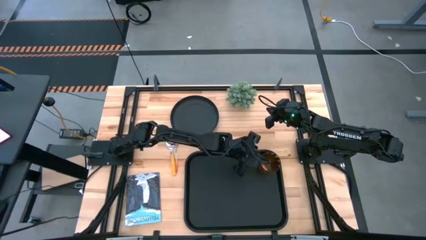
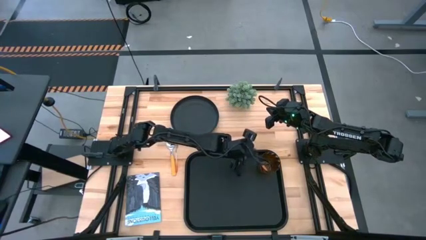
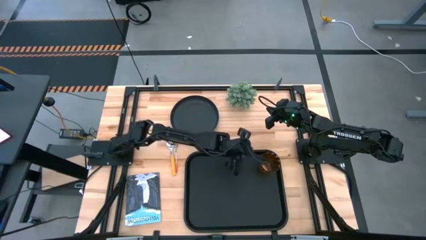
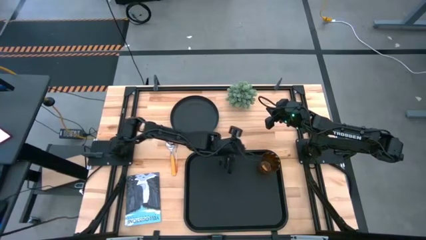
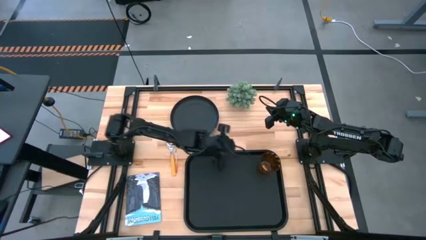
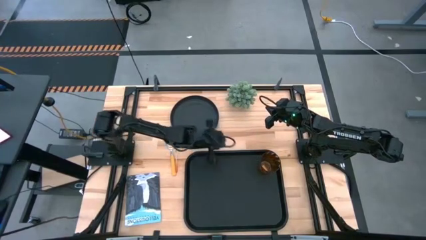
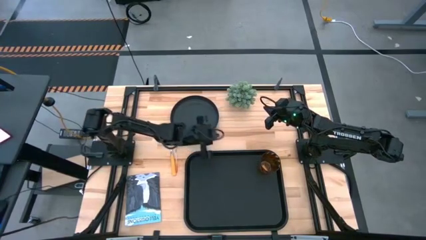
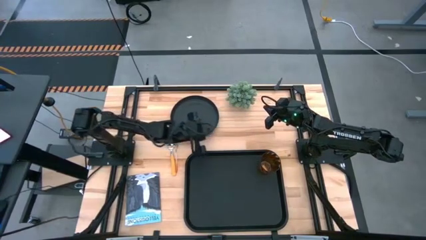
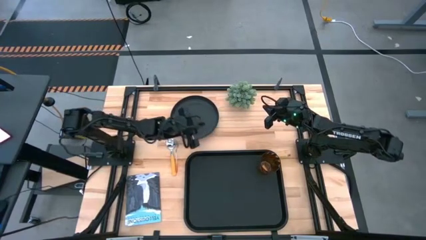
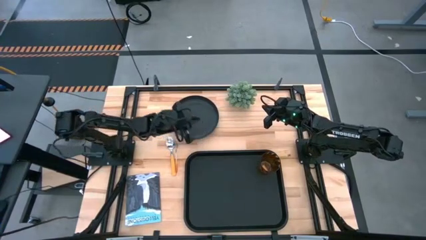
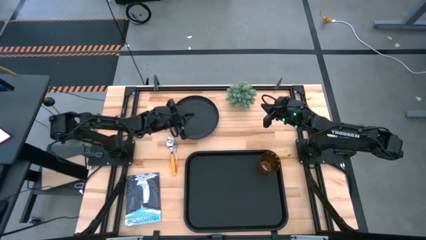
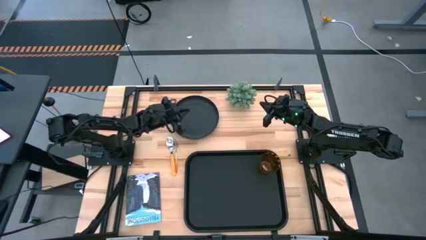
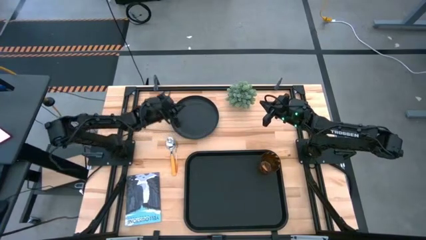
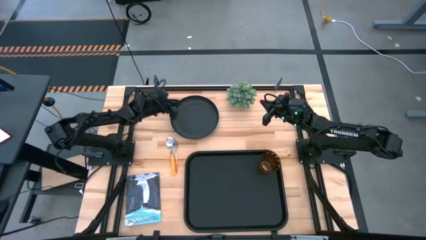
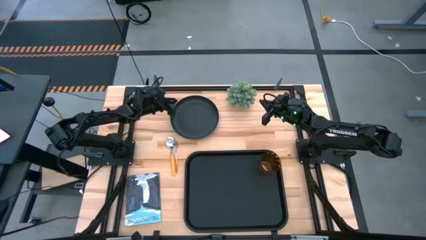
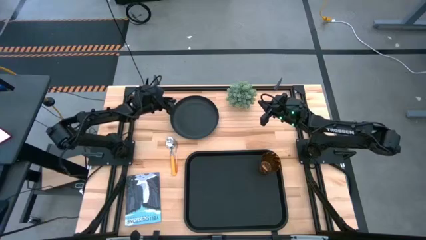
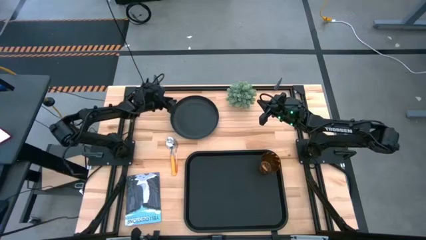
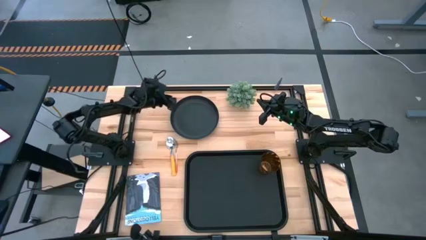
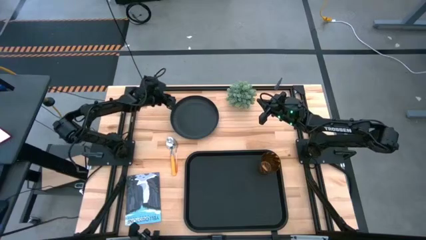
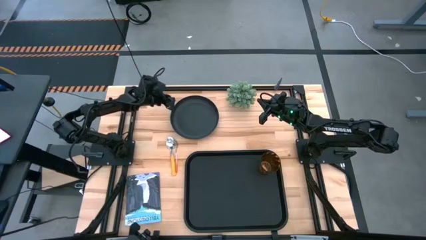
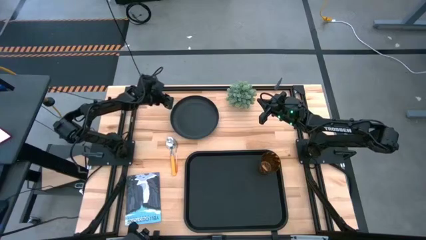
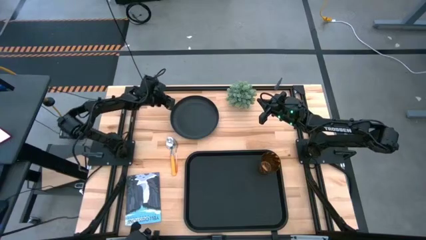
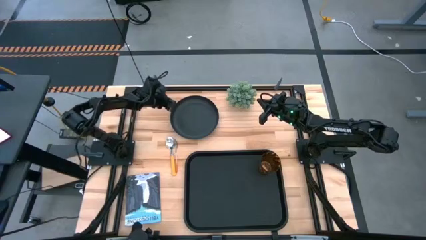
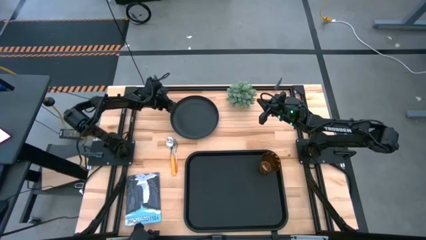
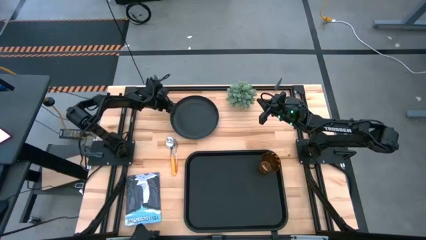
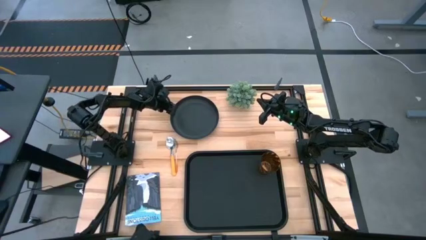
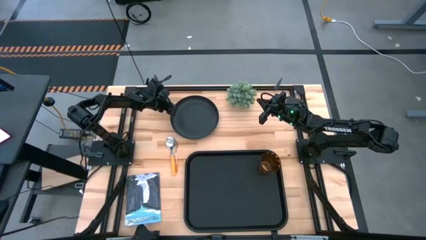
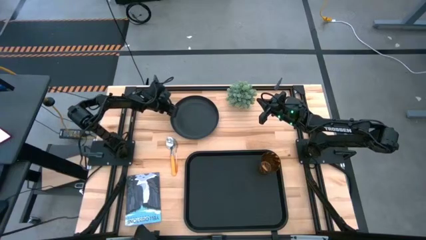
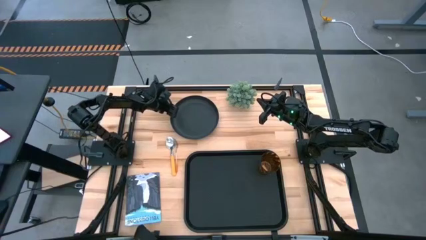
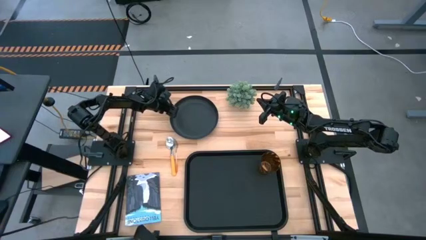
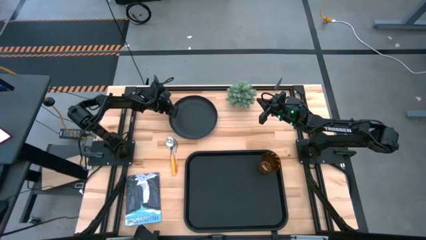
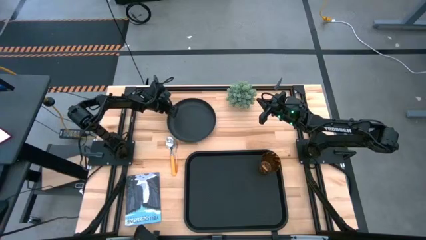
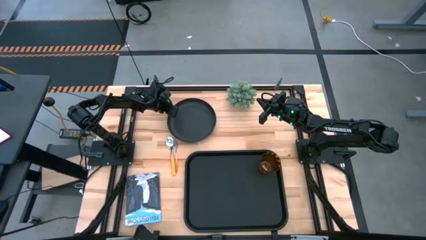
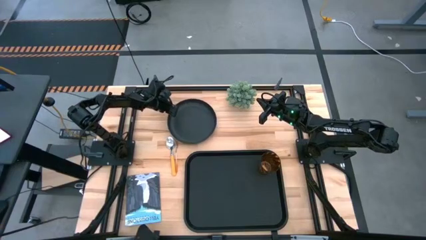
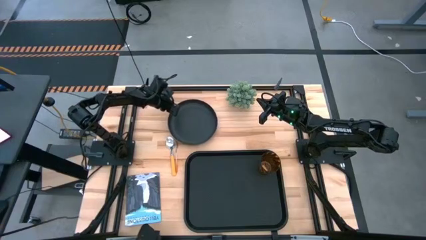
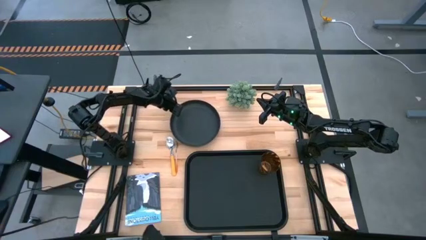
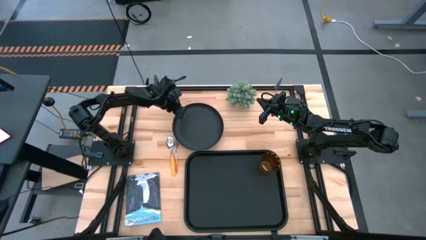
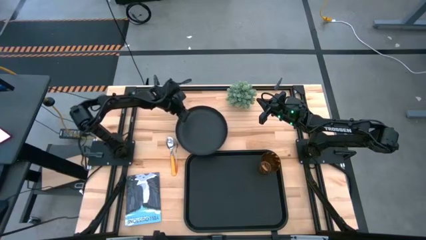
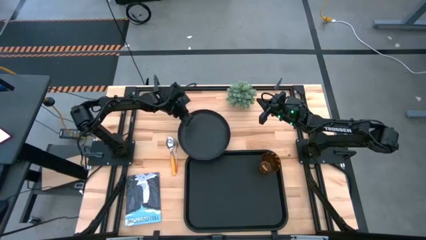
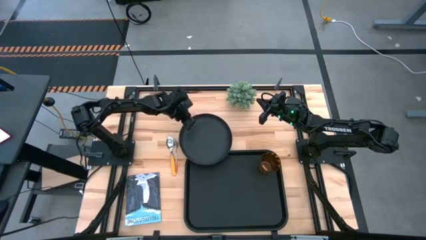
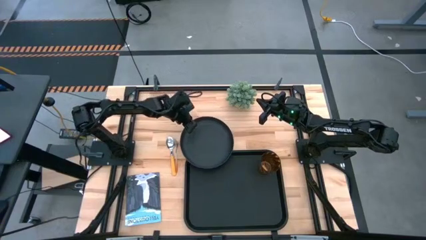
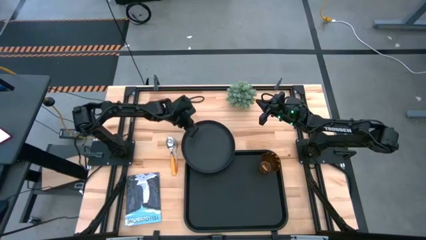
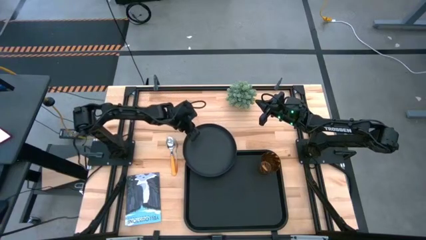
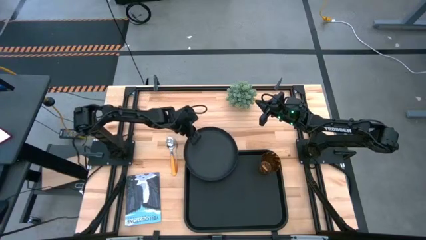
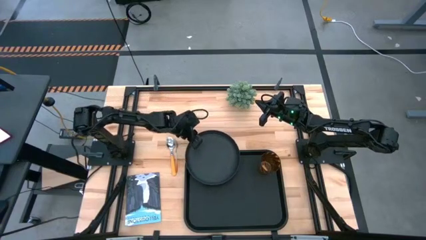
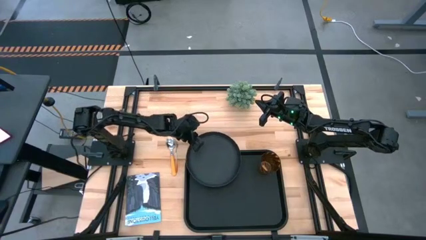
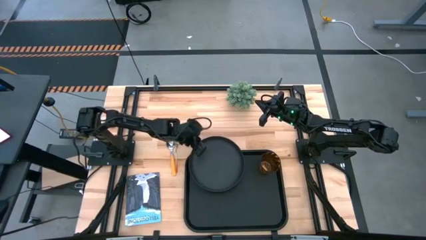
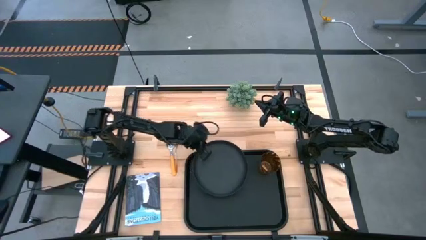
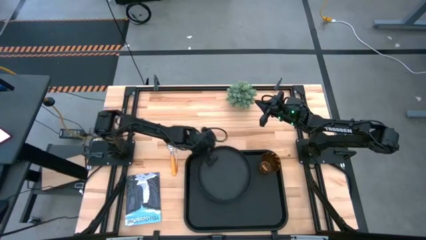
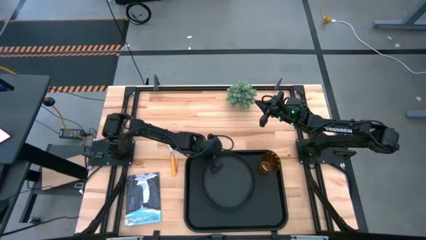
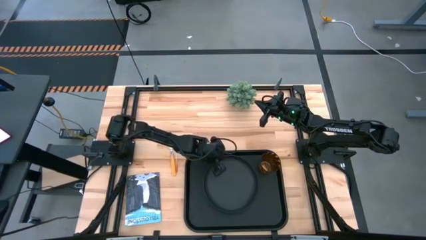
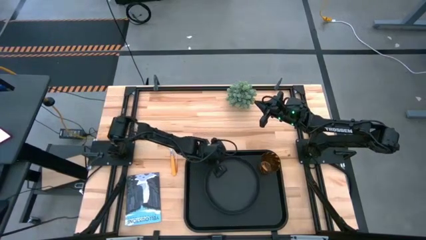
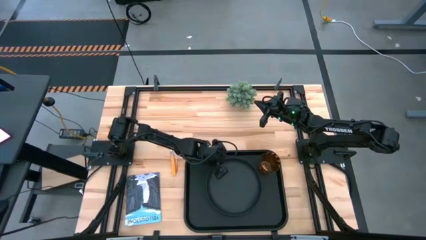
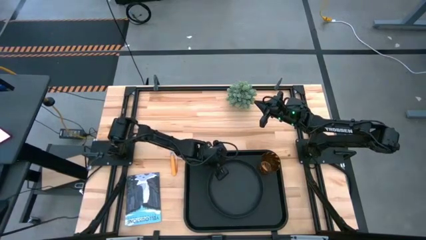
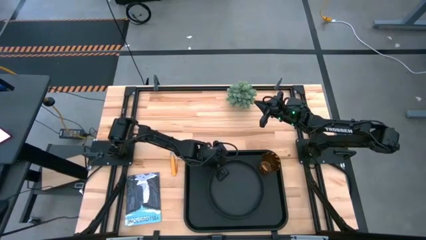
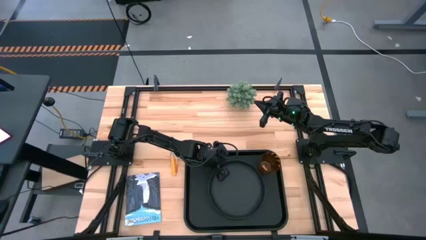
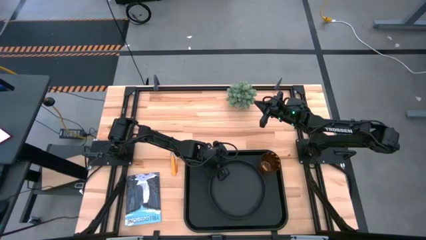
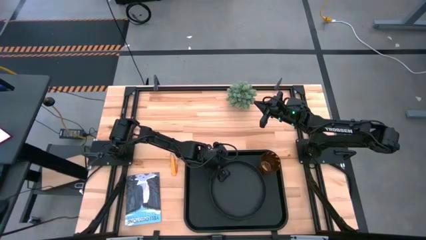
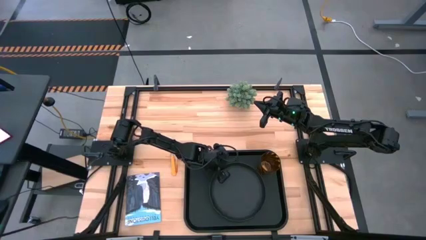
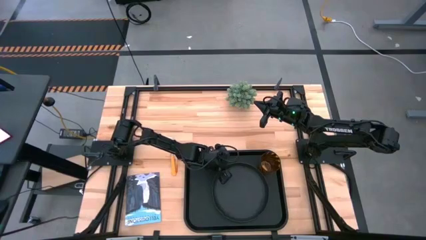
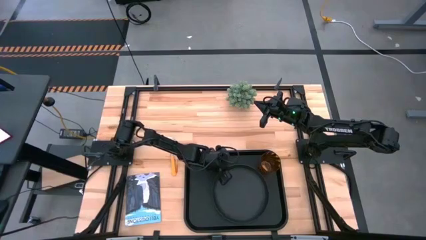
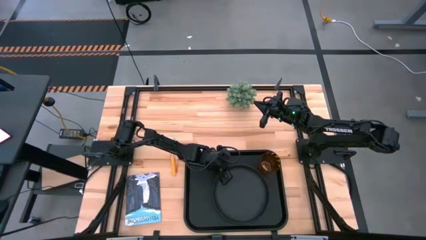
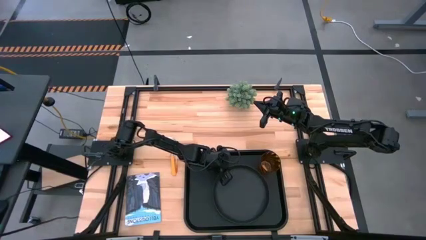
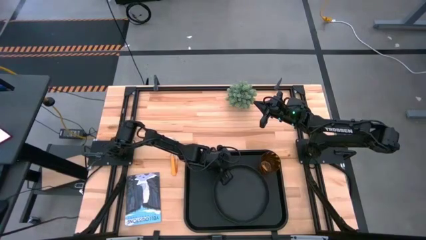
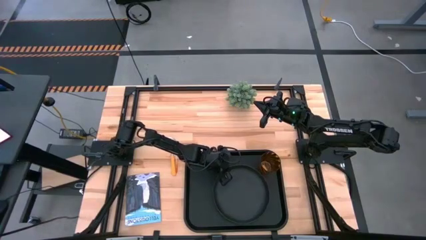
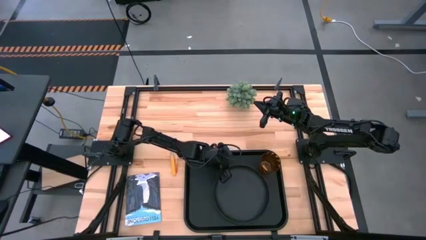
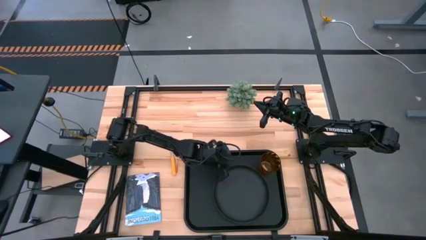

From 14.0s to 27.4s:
Task: Pick and place plate/cup/fork/spoon on tray
Put the black plate on the black tray to the bottom left of the brown cup
